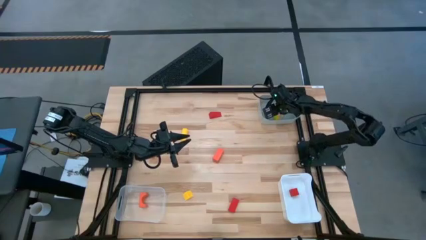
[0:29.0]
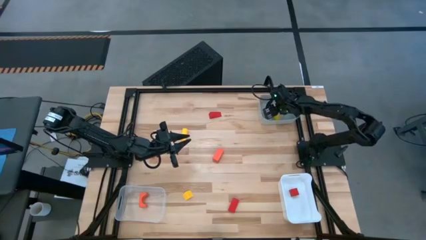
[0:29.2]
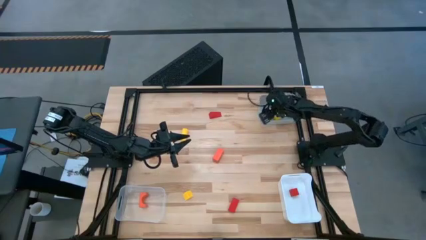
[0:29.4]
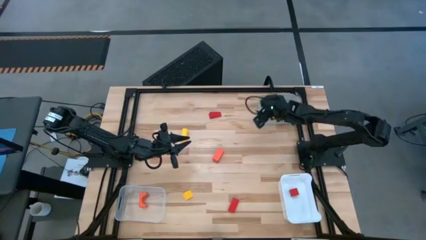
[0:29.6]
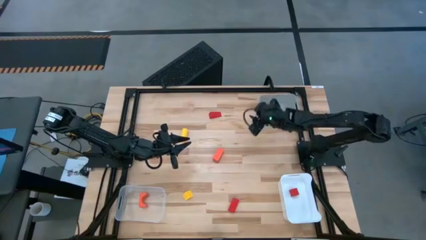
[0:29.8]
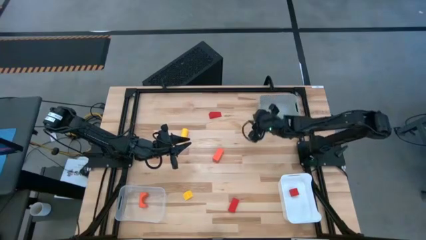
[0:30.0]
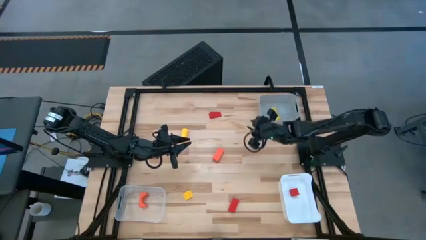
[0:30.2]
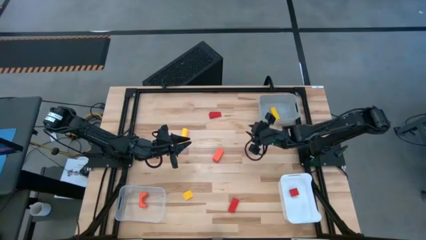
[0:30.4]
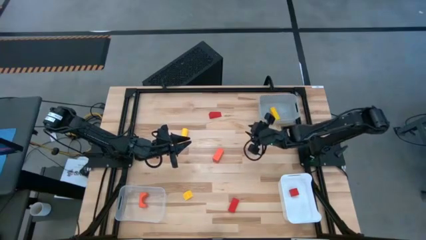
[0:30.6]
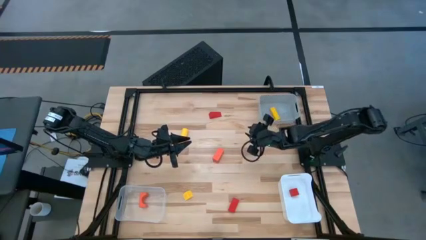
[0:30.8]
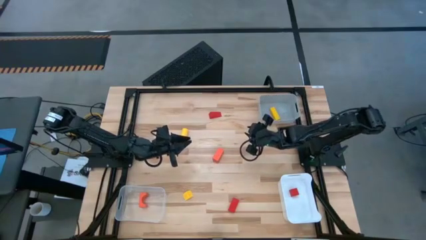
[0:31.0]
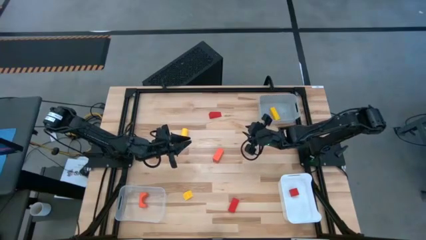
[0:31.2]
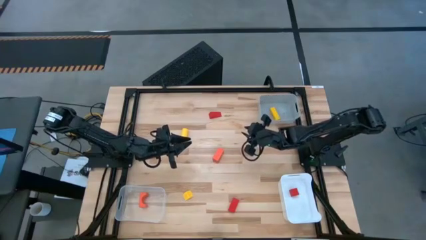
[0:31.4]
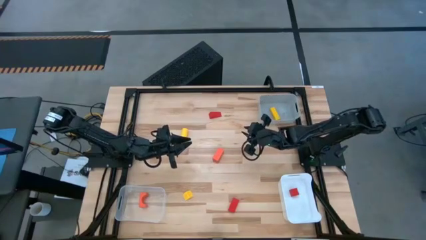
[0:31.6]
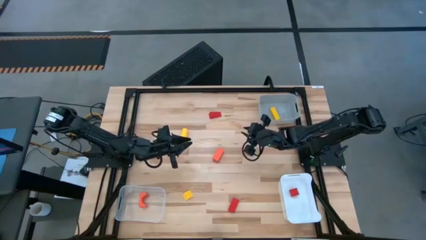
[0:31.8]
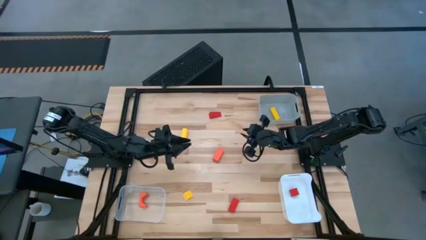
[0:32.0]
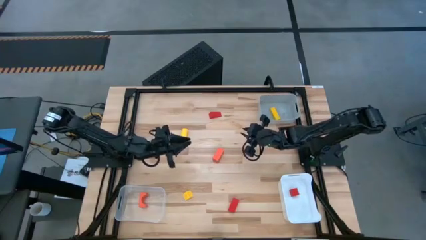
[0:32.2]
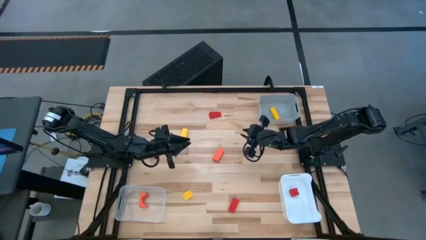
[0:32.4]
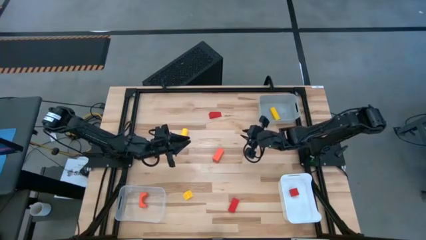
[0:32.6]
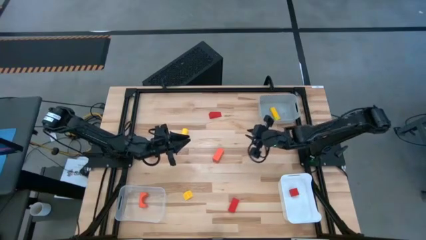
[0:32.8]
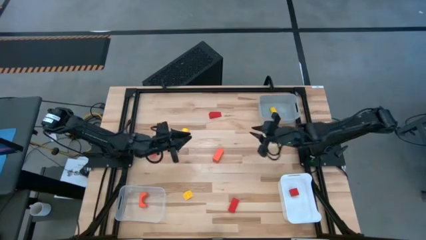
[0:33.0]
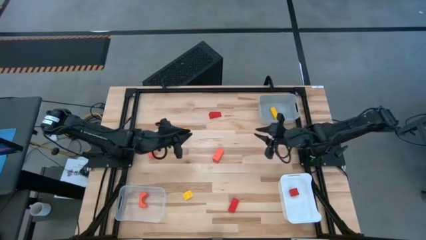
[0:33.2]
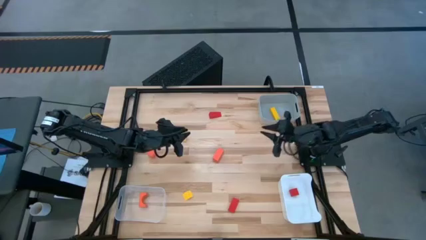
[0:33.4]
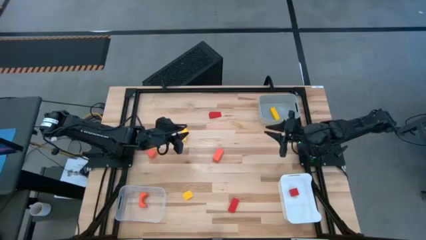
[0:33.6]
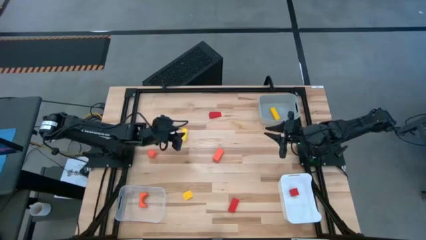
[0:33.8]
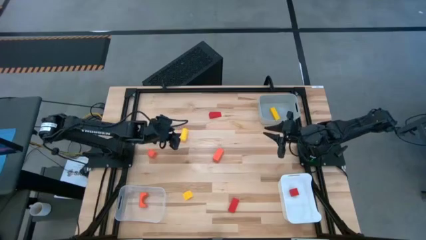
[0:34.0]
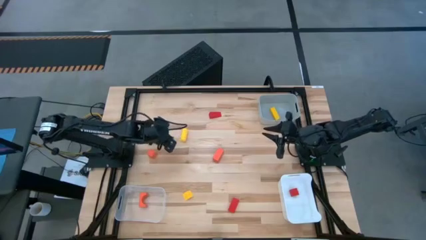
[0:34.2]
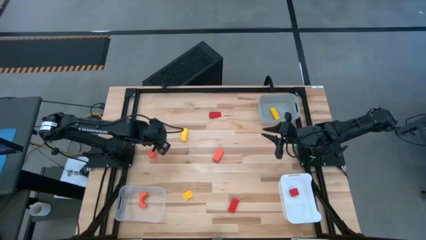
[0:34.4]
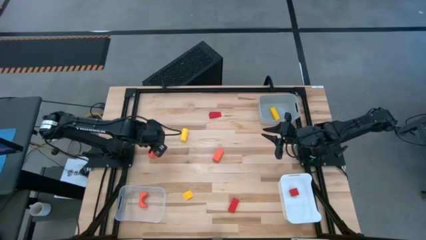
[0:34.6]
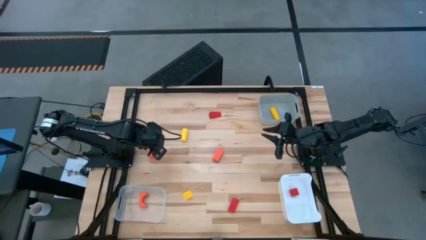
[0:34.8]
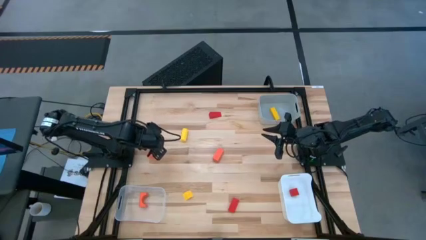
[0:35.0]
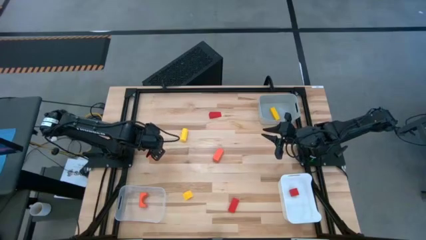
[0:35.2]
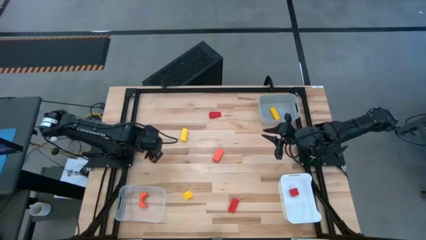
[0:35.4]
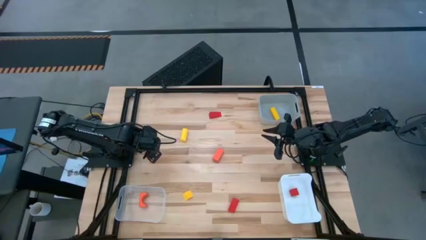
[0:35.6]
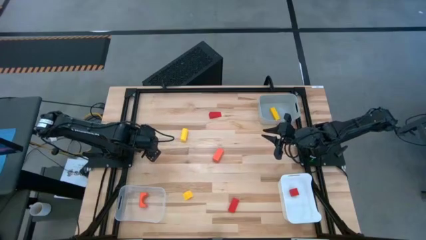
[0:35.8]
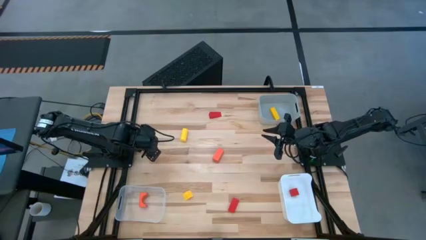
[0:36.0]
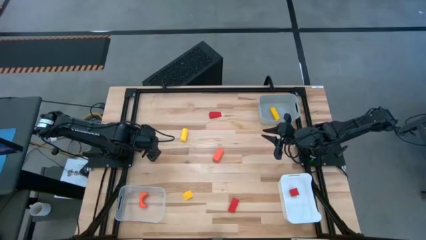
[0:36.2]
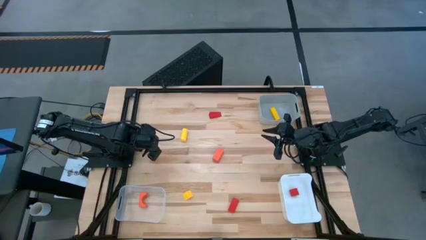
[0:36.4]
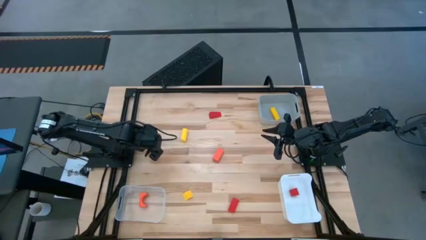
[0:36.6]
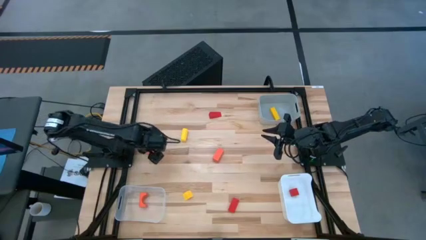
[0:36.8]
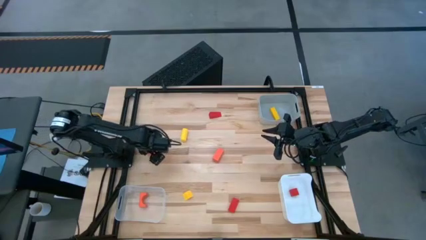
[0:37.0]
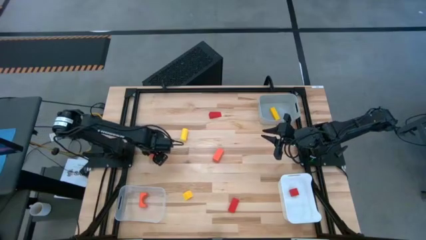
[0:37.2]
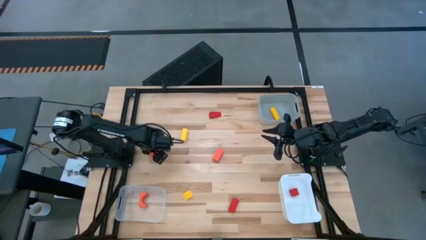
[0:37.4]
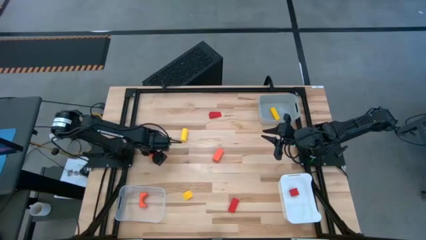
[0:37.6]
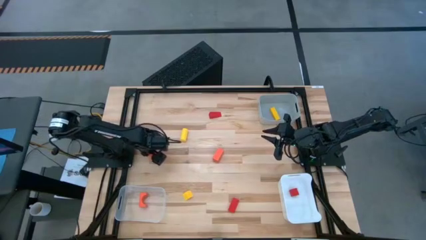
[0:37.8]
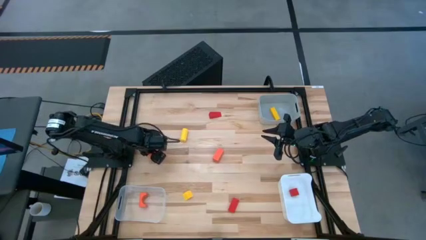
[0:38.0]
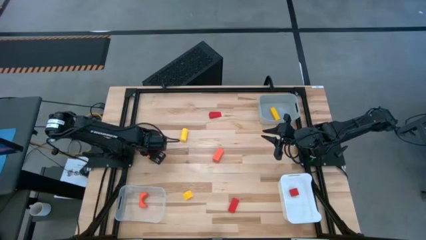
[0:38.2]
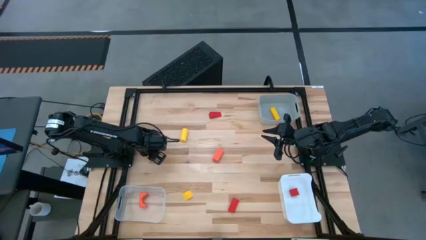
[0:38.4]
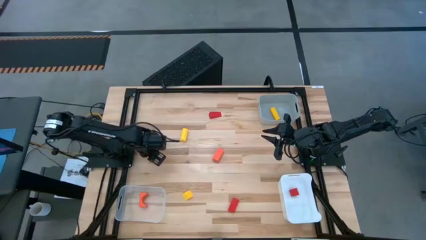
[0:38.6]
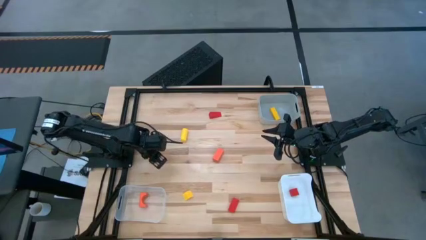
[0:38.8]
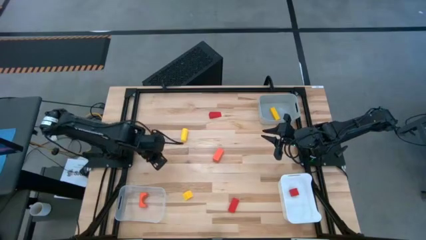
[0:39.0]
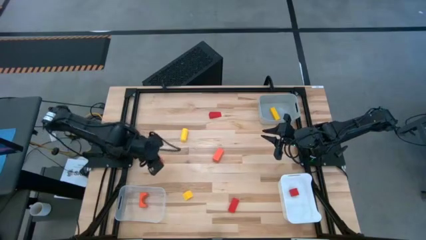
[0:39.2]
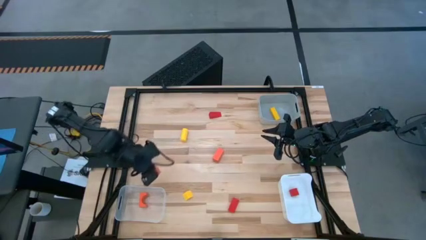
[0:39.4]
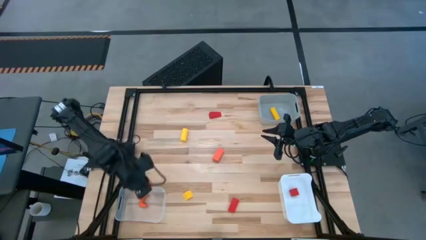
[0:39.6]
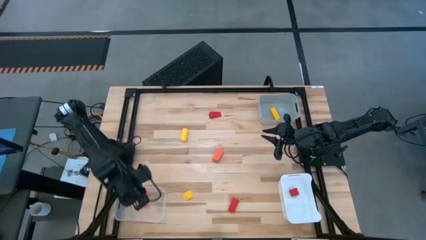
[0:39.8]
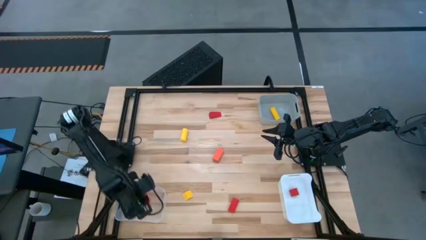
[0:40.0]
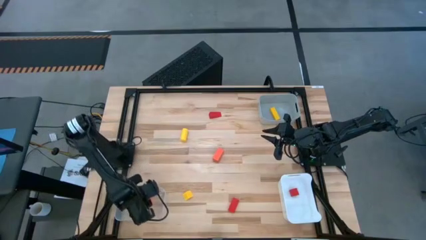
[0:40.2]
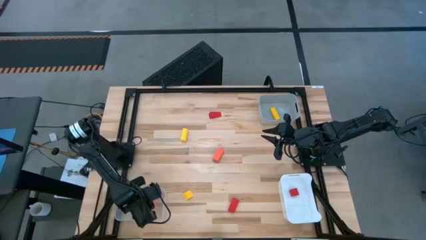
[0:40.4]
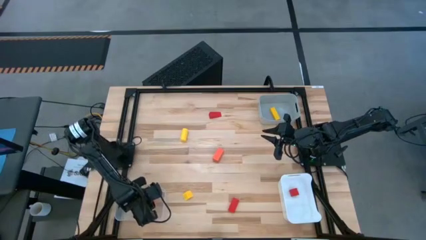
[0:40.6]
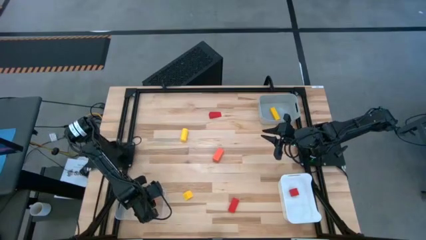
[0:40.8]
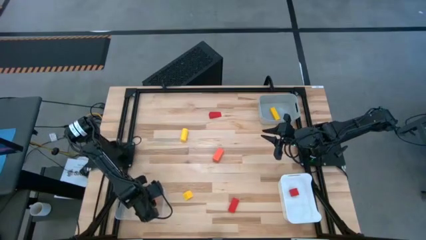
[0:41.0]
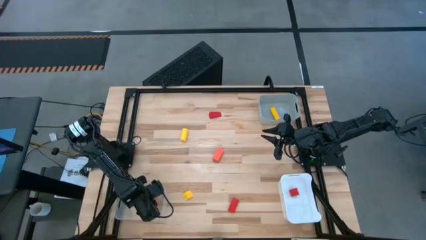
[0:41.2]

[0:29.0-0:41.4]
Task: Sort & place blocks by color
Put the left orange block into the transparent bin

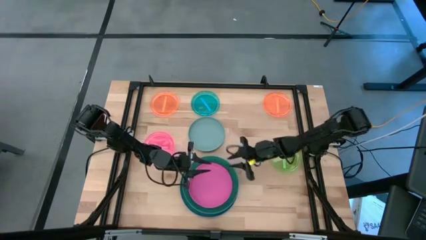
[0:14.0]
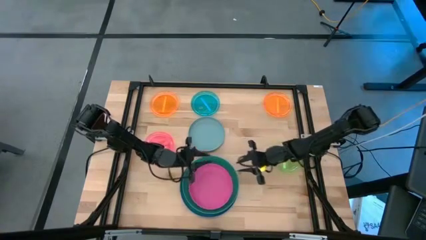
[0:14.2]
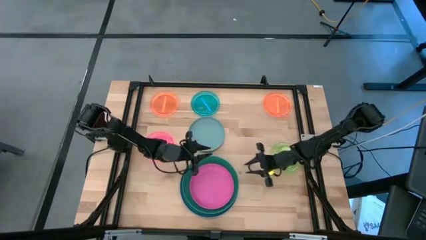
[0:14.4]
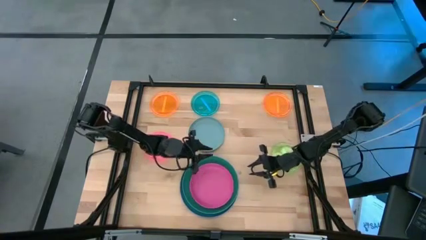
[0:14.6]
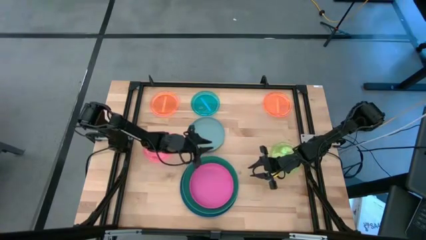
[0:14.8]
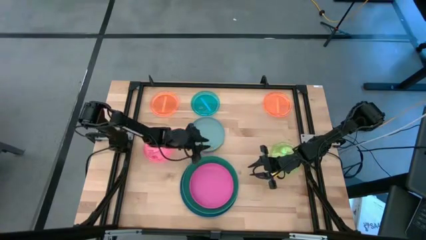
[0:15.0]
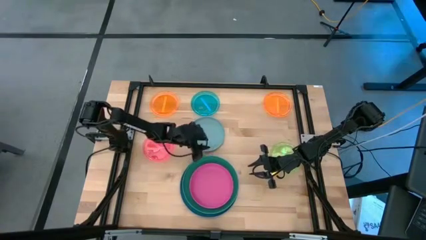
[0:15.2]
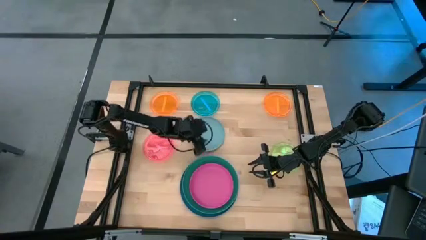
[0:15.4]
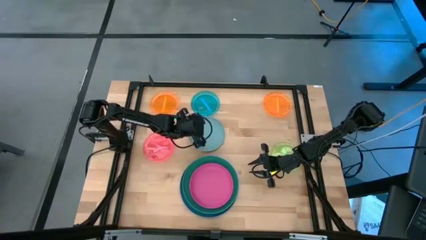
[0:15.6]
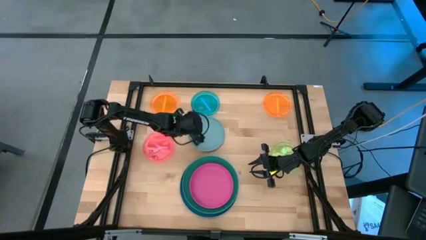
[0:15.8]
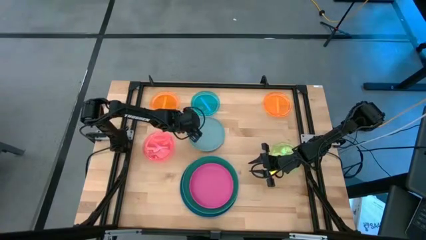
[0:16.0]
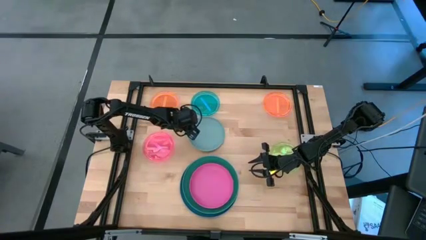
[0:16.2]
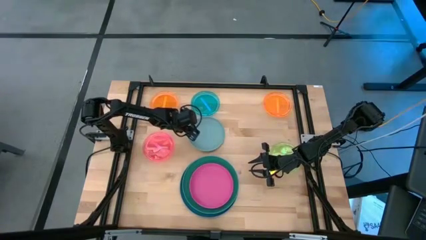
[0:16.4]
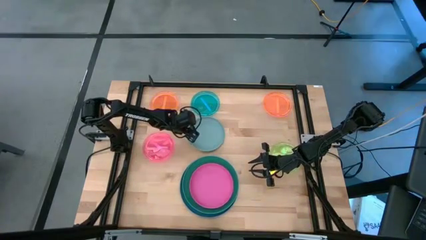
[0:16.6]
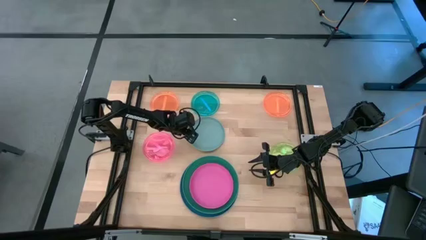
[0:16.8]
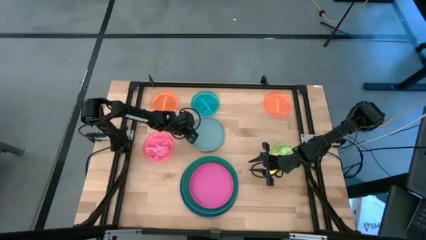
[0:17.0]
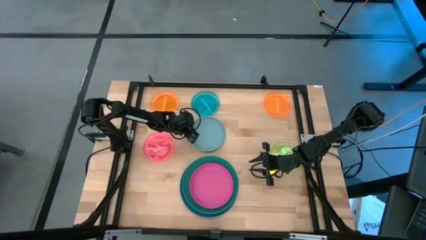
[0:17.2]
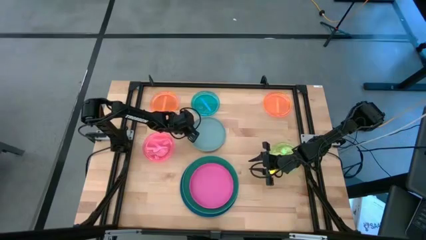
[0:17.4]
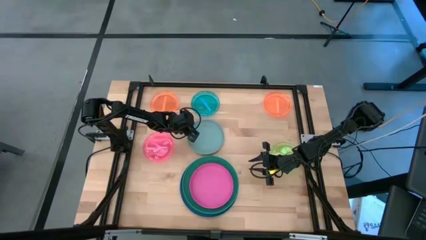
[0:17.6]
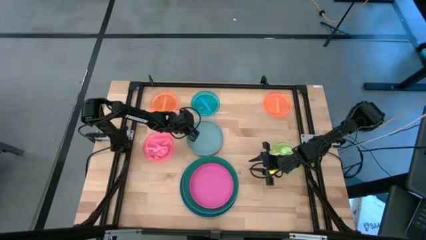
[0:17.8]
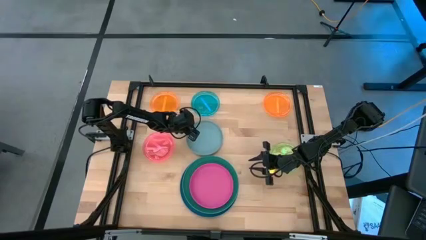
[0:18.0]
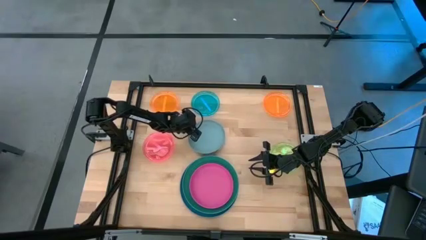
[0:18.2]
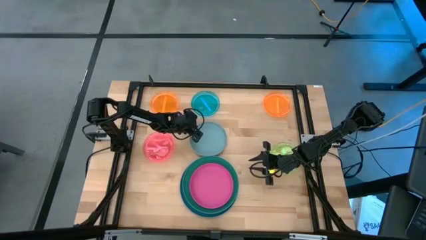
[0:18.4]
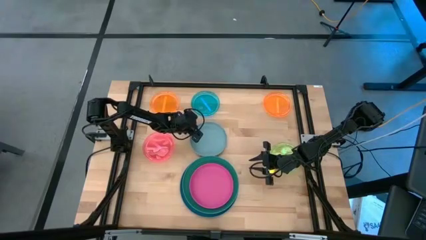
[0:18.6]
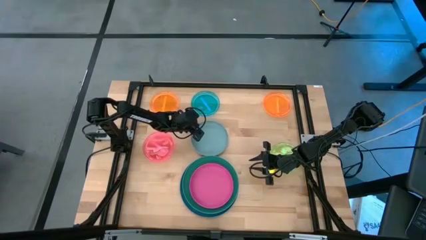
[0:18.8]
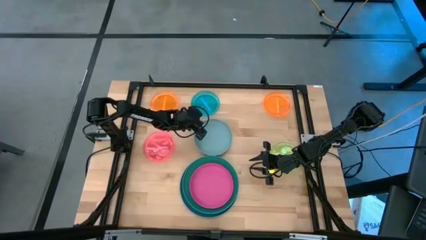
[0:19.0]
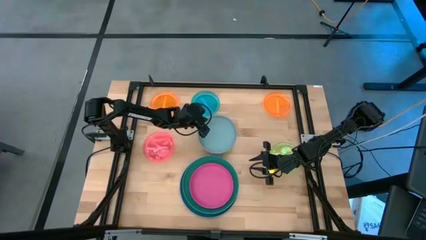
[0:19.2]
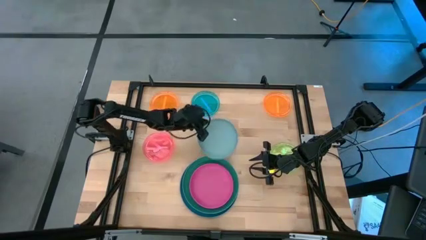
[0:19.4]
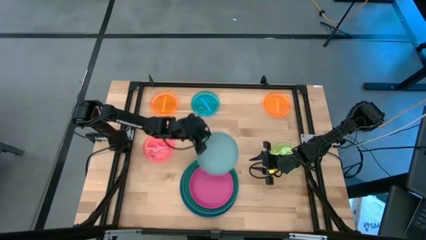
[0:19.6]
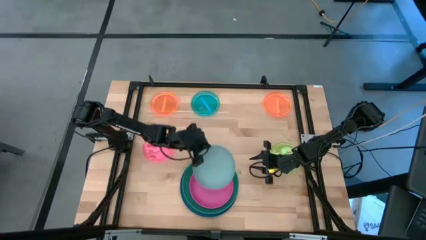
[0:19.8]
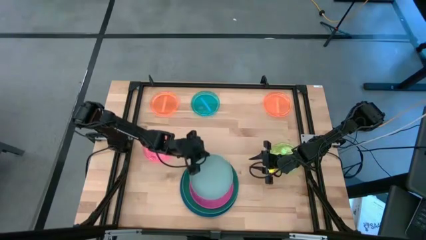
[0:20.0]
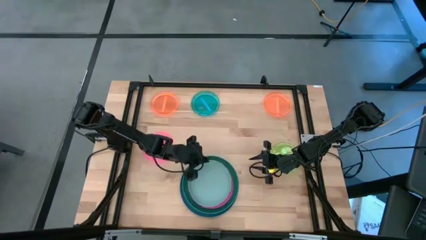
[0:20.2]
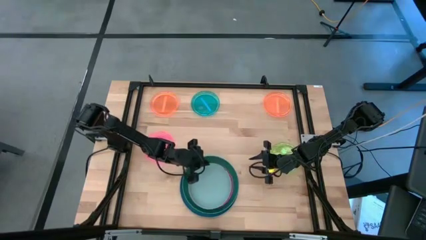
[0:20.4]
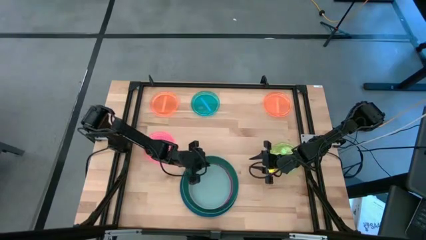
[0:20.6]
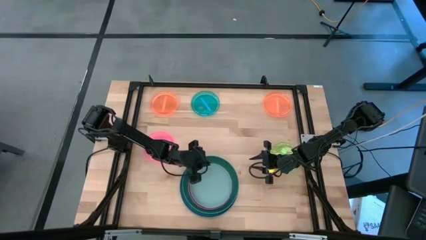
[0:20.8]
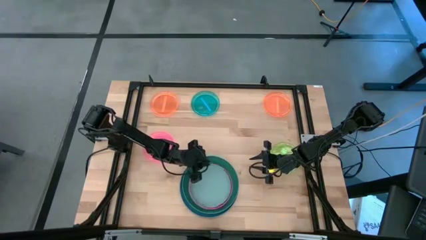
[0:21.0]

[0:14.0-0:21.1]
Task: Stack plastic plates
Stack the light blue plate on the pink plate
